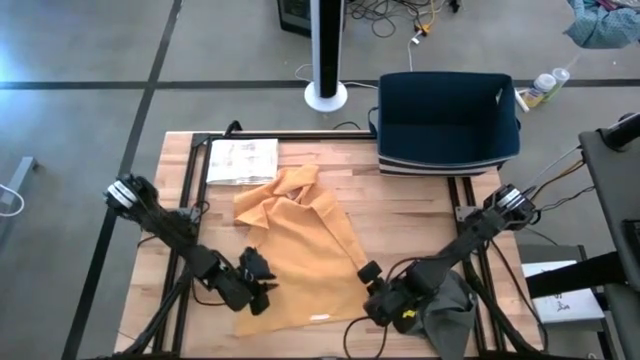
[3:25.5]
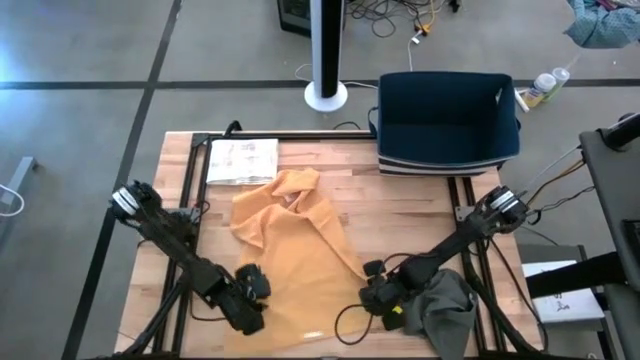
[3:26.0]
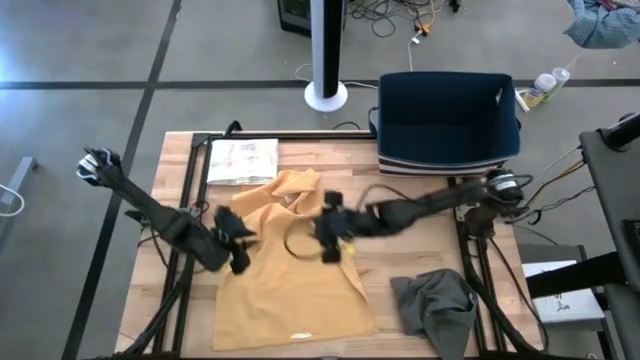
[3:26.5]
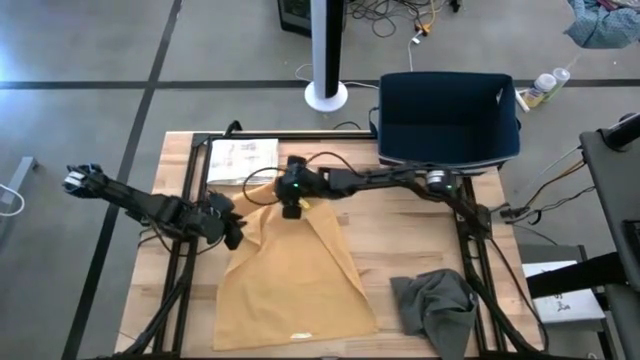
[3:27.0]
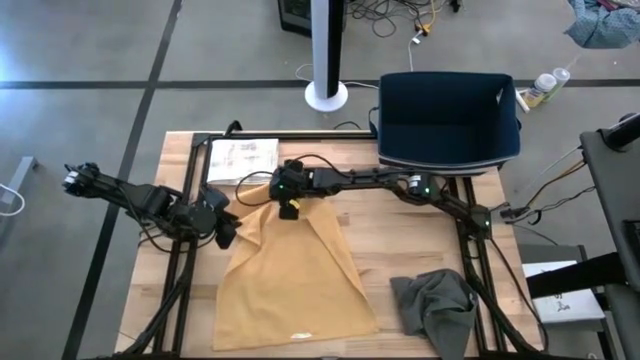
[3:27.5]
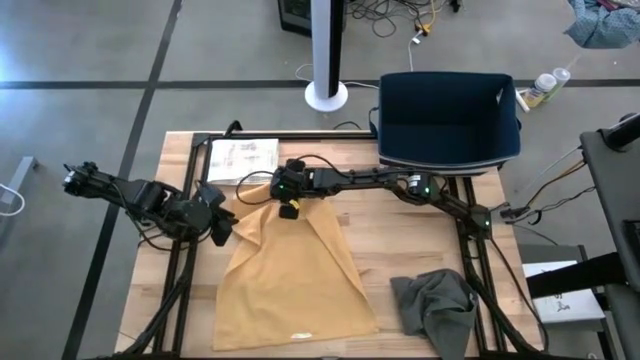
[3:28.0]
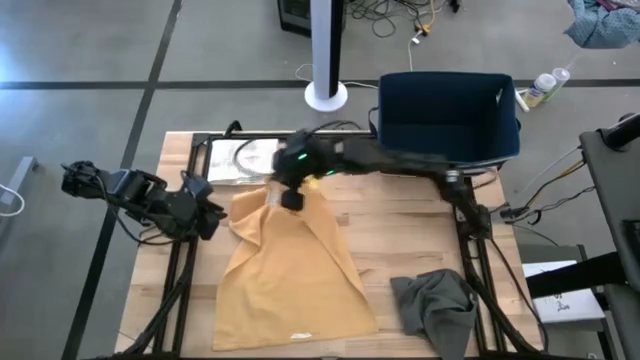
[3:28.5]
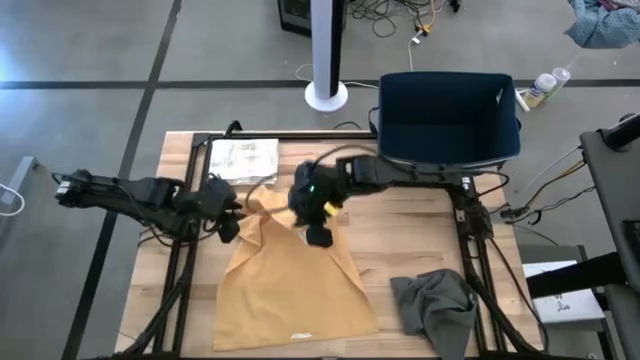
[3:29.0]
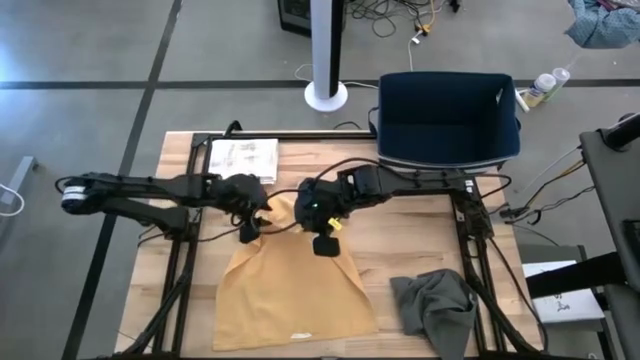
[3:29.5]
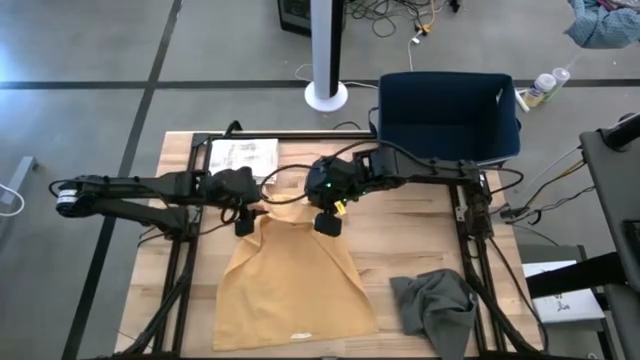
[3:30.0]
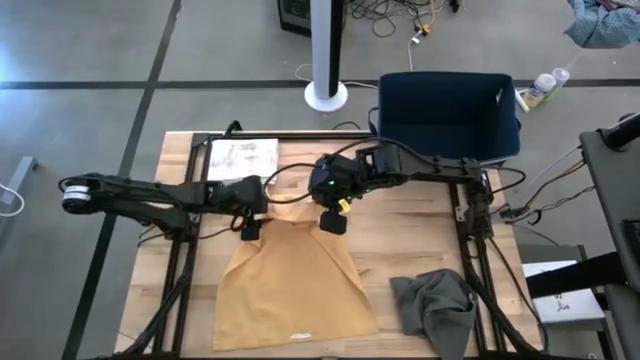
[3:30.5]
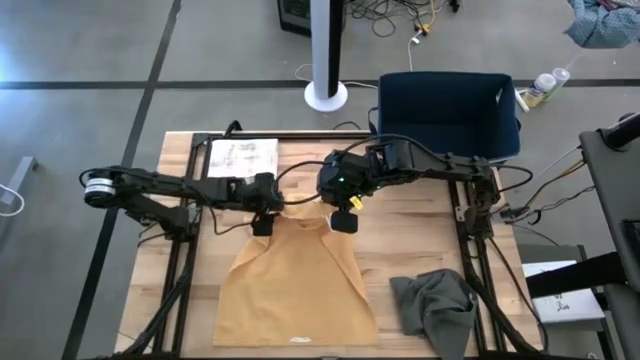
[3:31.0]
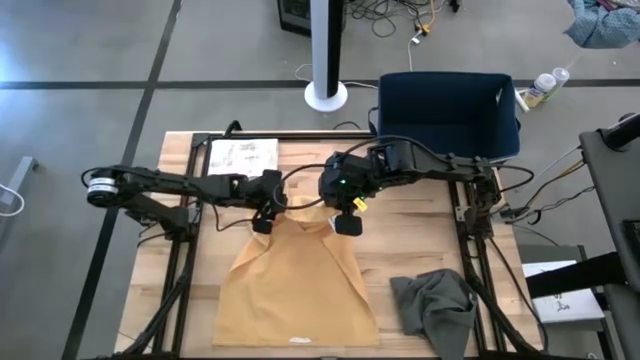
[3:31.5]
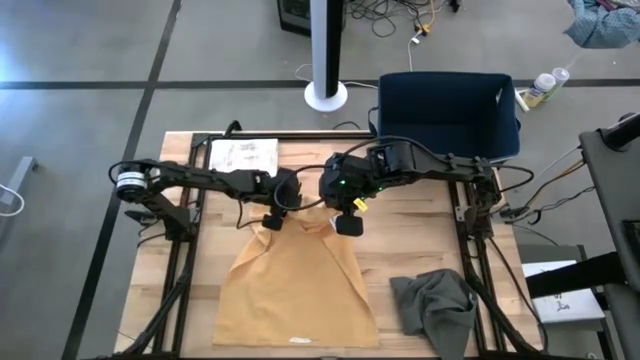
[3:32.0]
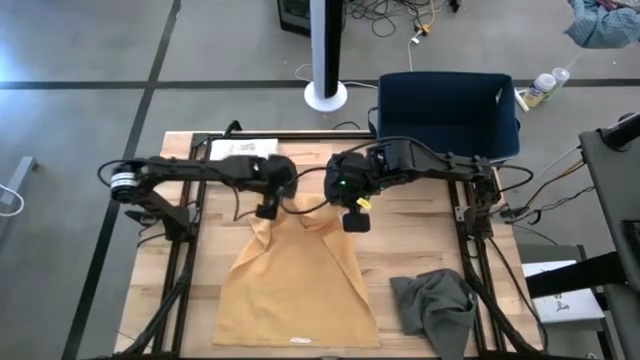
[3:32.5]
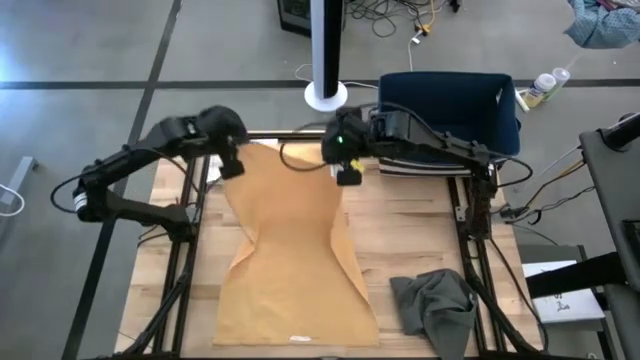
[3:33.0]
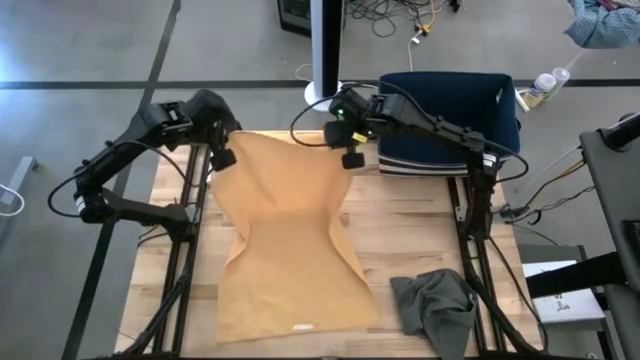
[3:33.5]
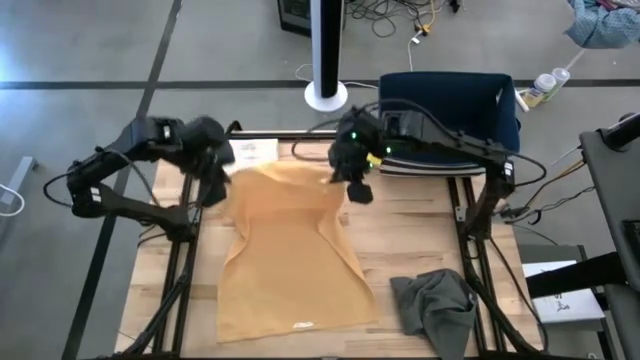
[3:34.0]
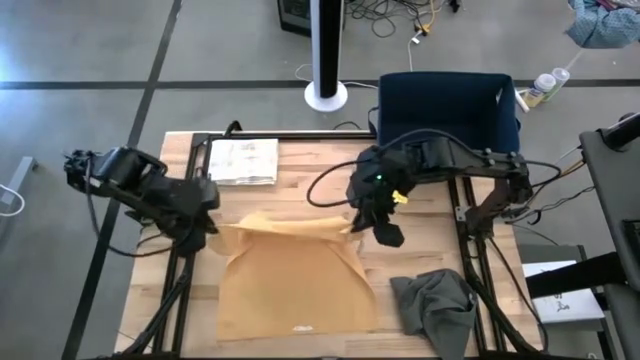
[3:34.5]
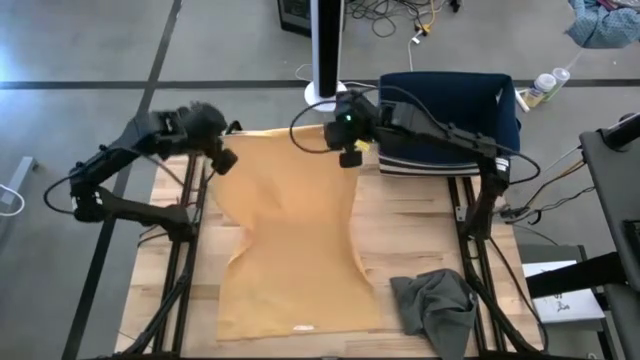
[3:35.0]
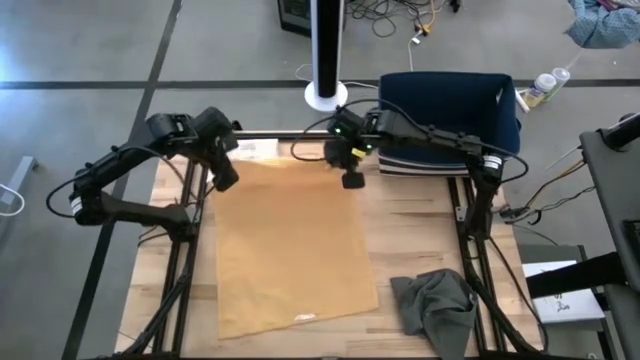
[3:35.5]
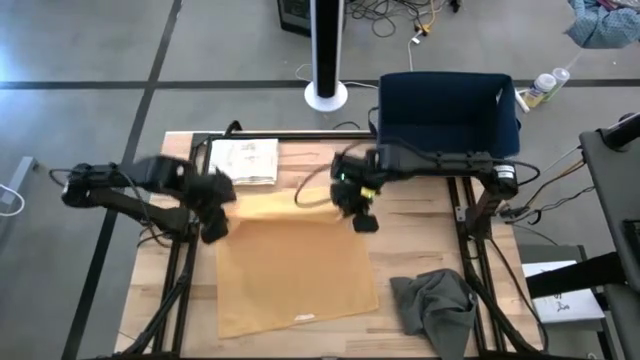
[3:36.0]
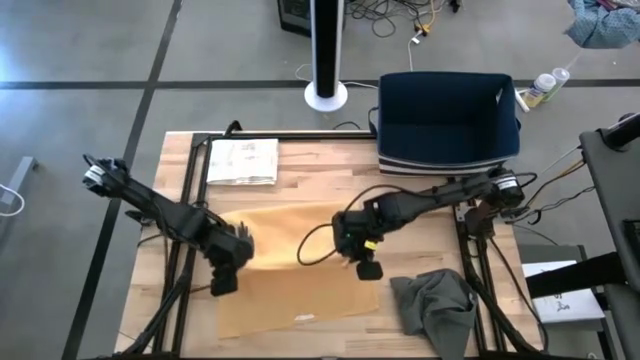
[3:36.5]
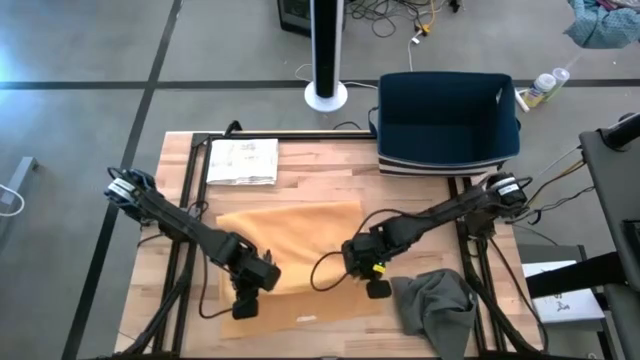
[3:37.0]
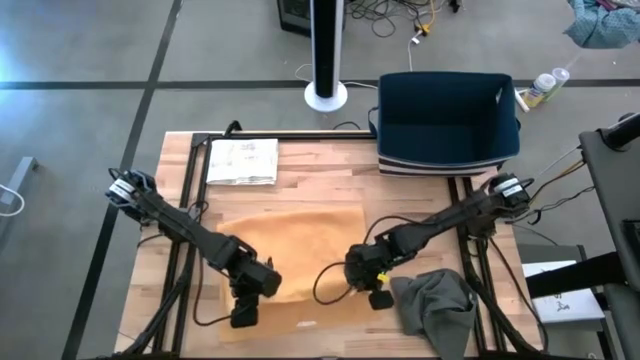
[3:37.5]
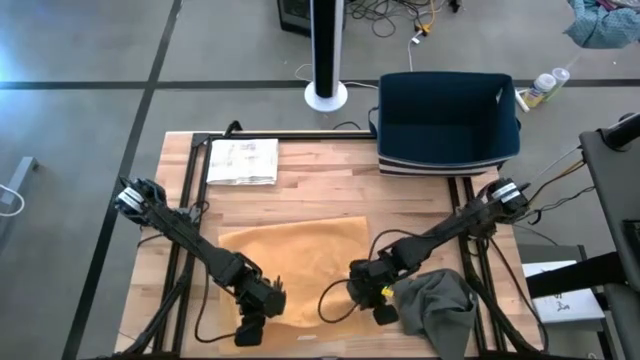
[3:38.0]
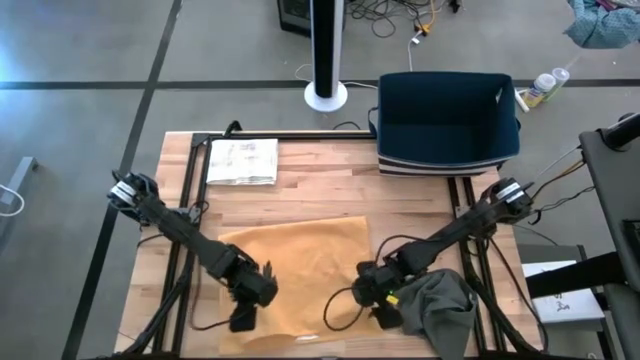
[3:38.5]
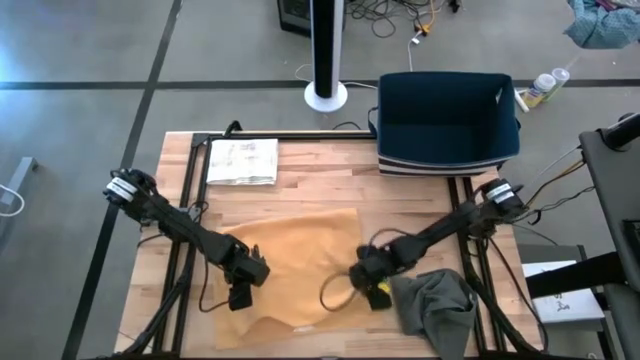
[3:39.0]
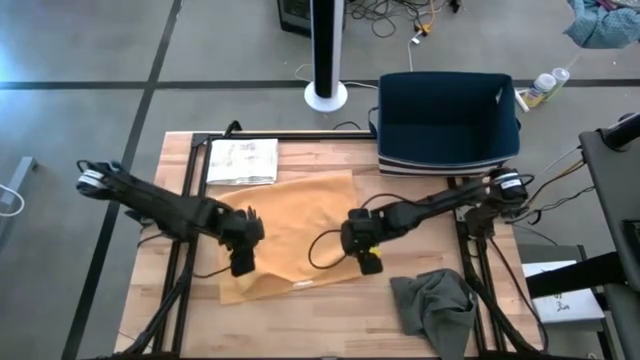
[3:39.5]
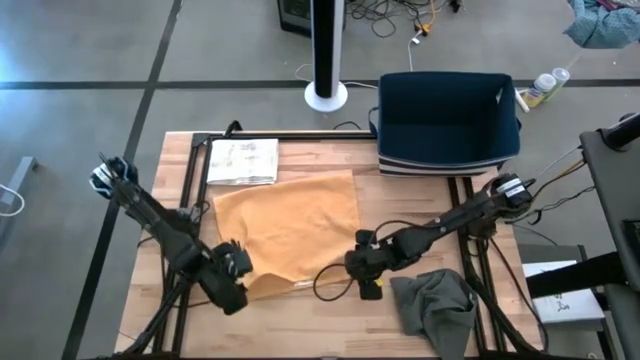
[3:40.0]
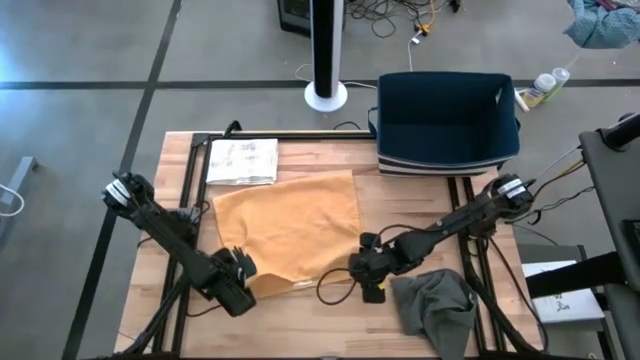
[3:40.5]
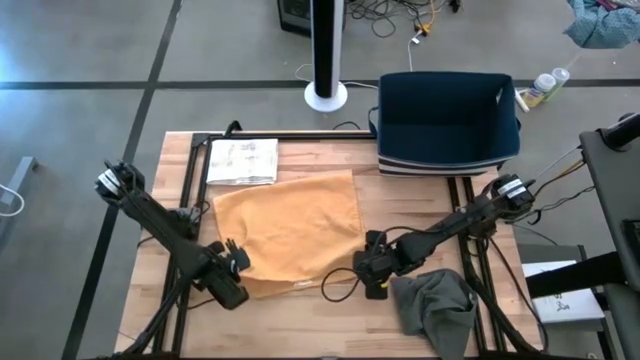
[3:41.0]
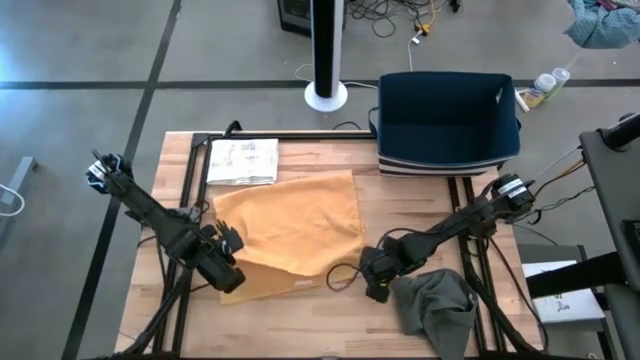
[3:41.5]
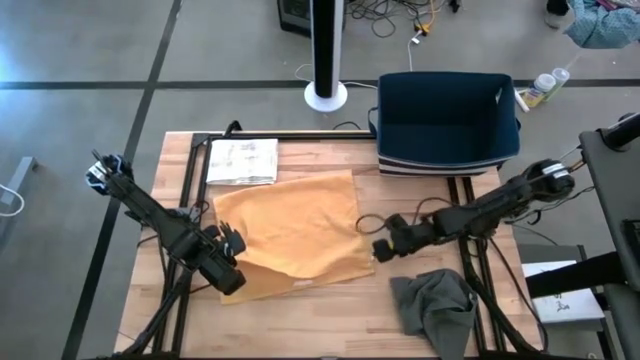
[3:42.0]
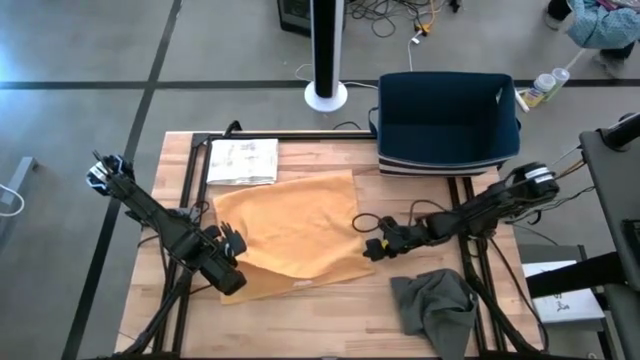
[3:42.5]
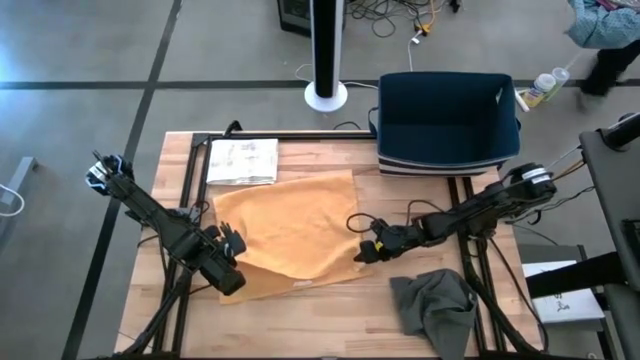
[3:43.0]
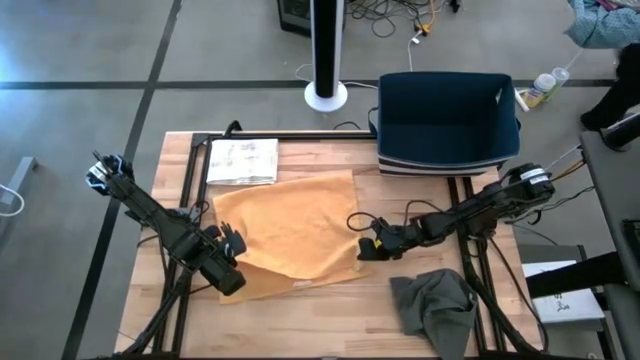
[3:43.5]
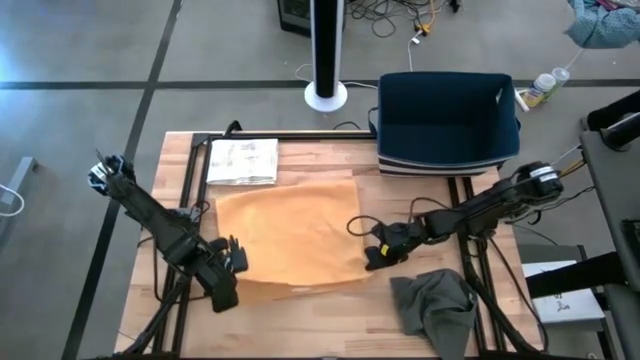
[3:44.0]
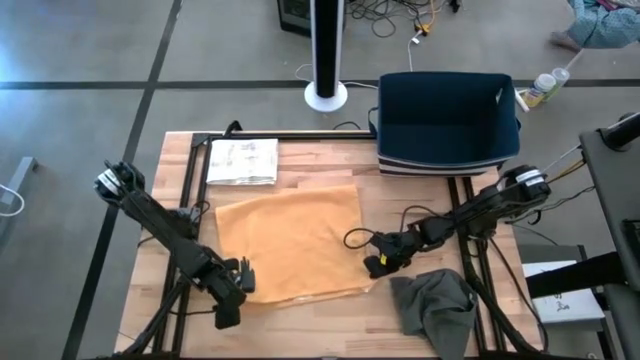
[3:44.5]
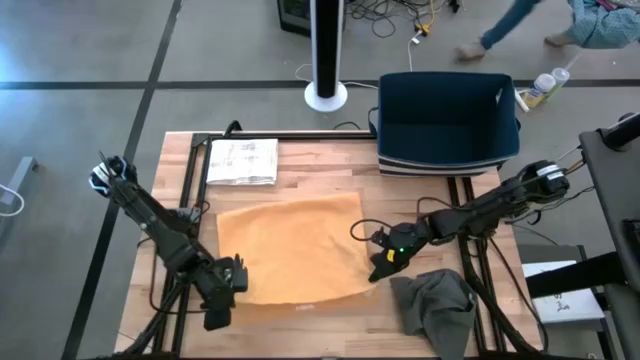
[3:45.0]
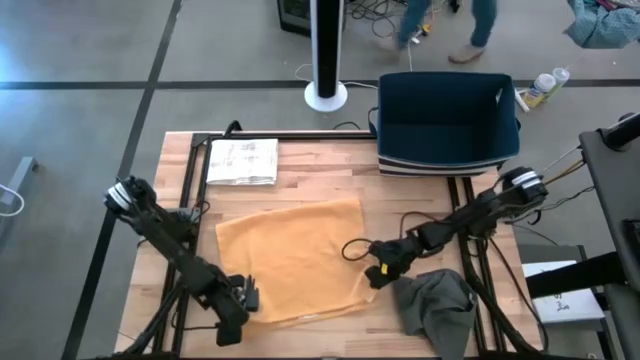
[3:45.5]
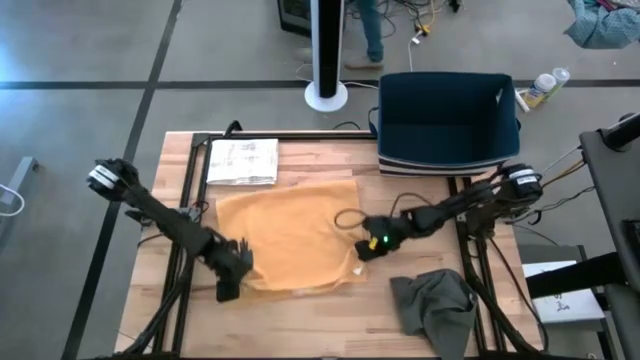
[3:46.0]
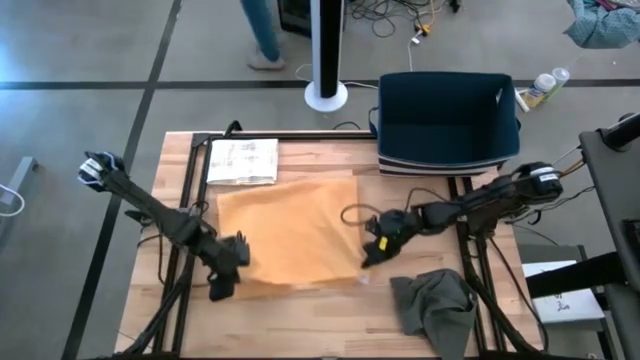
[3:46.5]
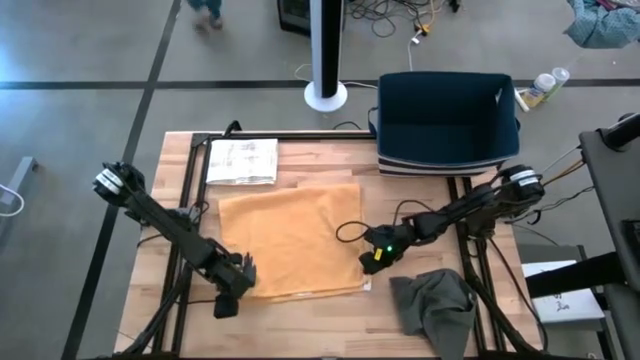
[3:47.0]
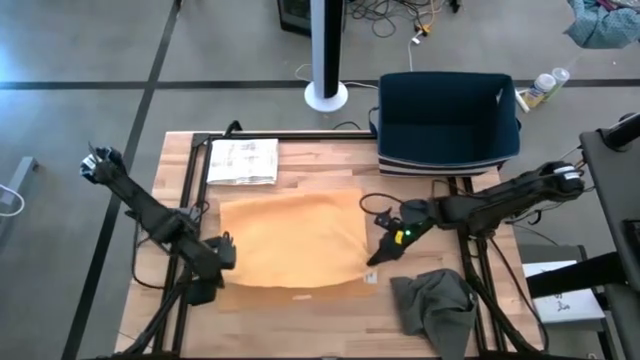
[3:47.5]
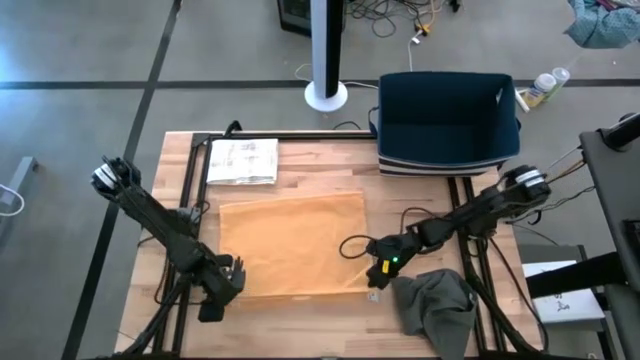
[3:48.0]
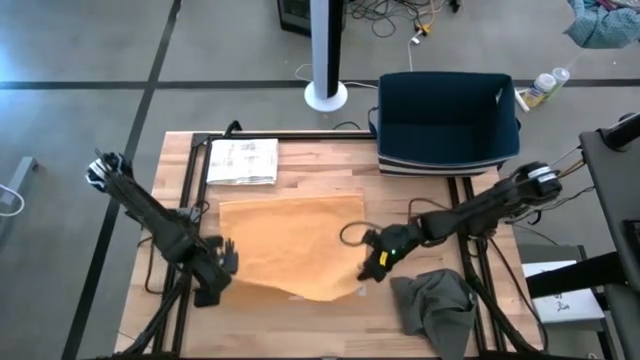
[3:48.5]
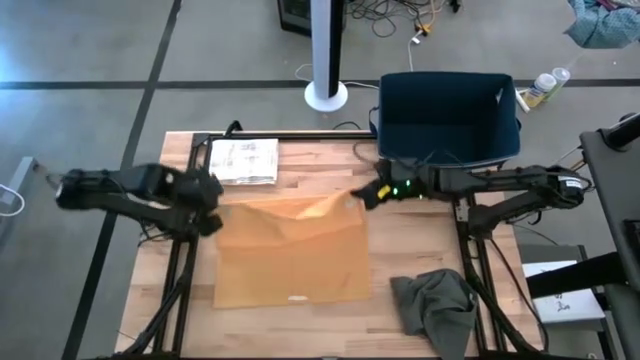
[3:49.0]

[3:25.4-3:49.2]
Task: Fold towel
Fold the yellow towel
